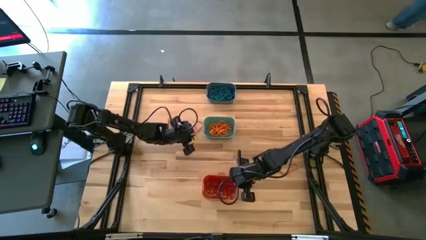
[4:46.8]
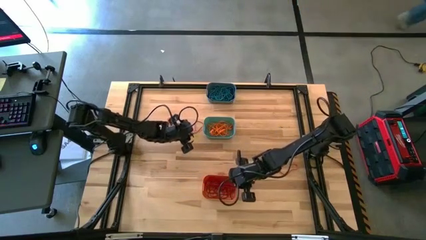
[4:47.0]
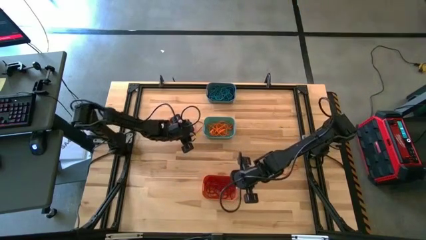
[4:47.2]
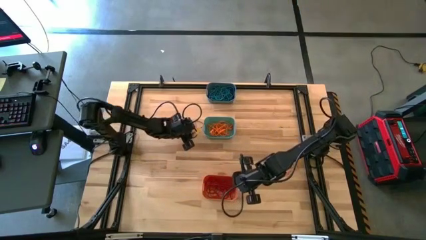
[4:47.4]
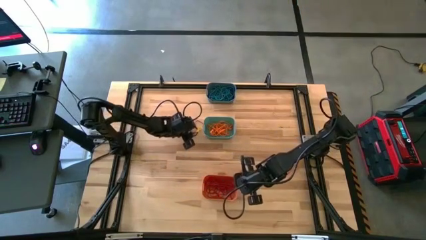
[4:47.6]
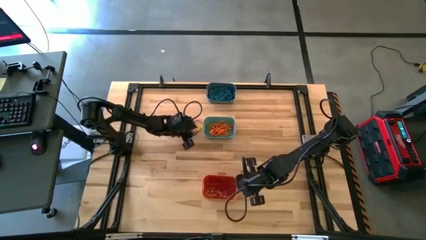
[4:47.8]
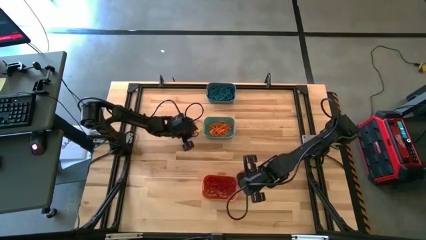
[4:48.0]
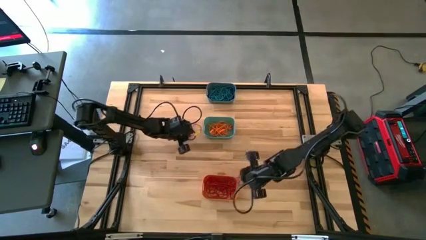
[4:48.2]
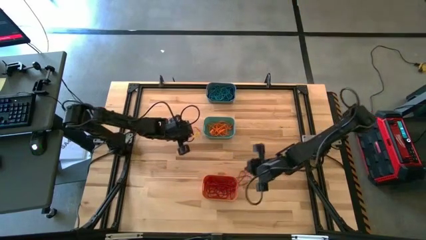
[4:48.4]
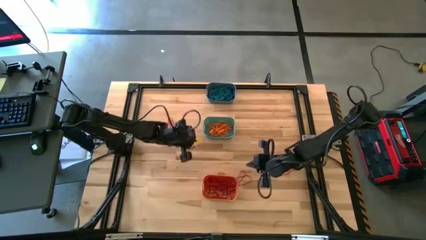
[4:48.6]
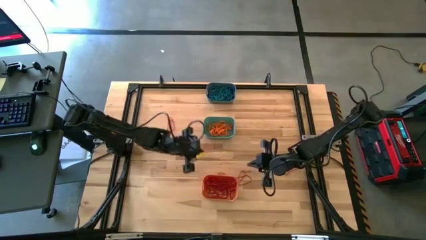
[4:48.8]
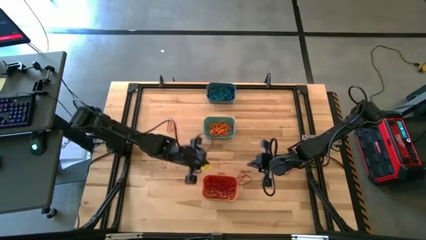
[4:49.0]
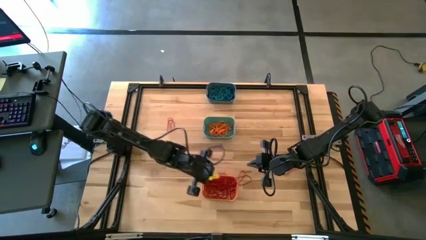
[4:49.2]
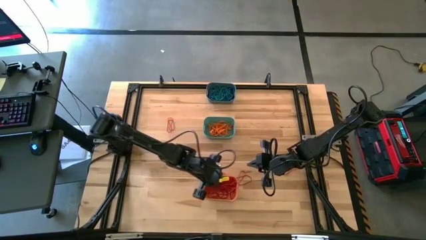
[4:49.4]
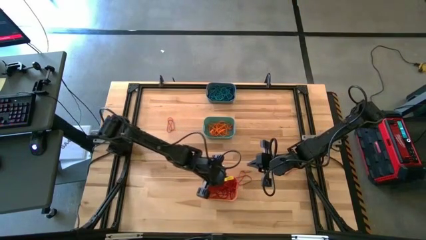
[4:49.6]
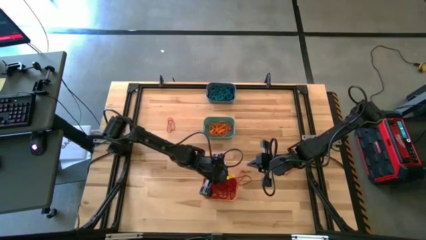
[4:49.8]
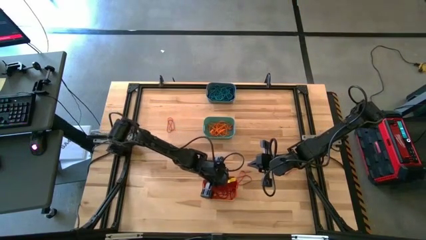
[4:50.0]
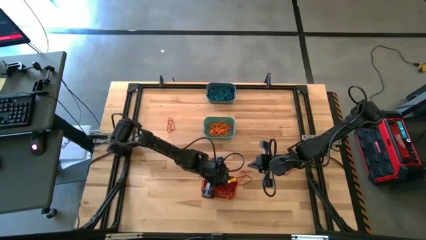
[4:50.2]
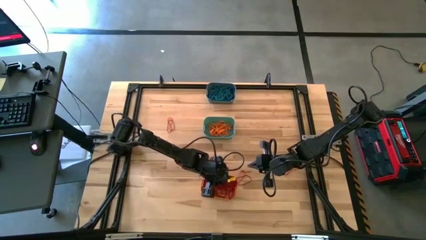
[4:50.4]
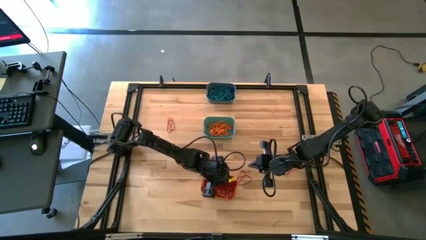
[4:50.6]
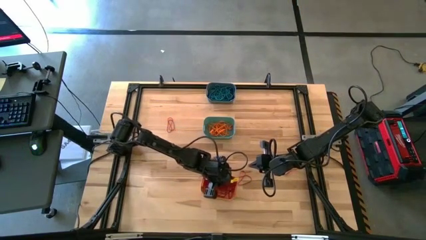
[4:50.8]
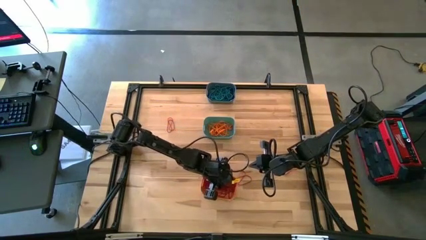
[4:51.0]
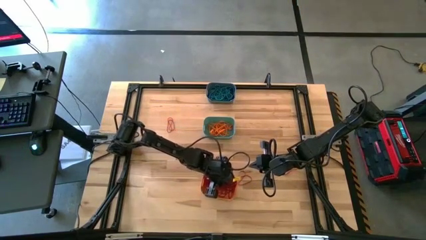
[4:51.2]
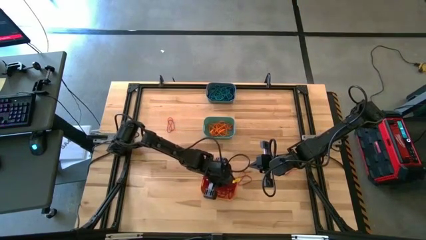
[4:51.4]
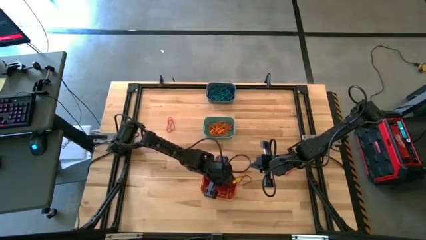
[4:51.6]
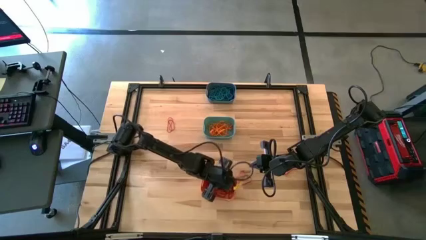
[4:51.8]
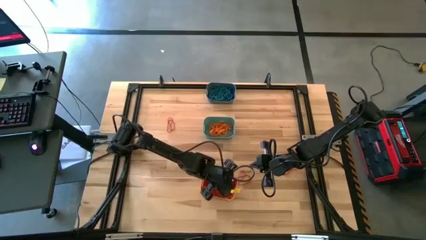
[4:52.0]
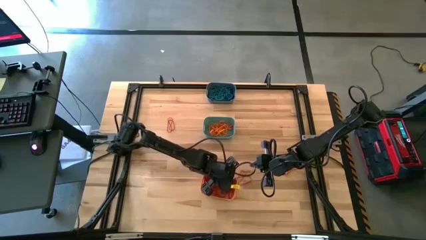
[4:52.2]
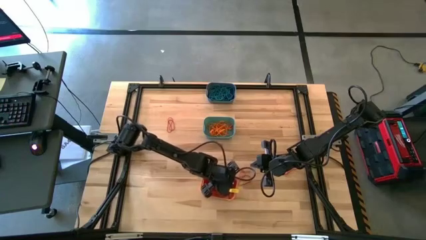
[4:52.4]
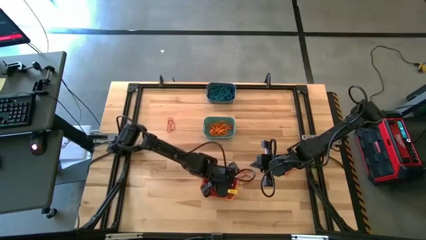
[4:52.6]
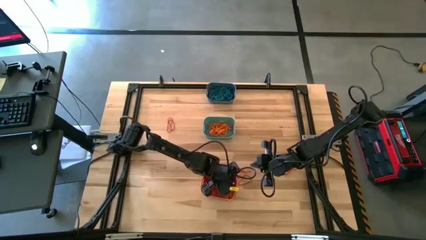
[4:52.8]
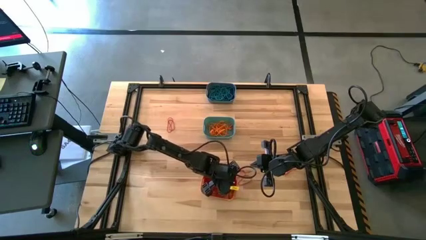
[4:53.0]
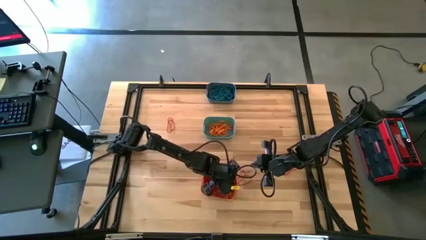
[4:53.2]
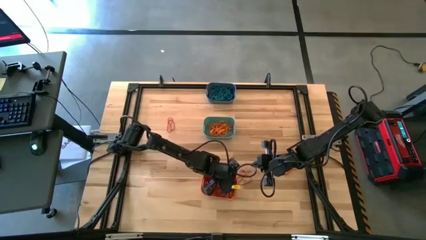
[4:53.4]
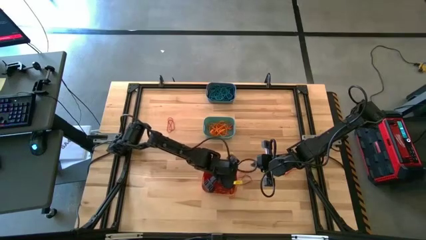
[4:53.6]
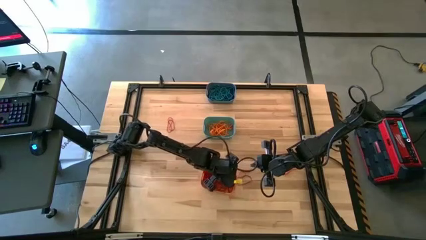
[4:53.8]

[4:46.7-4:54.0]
Task: Sort rubber bands into baskets
Put the red rubber band into the orange bin

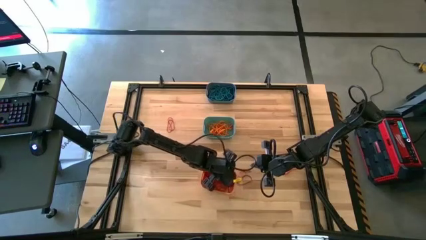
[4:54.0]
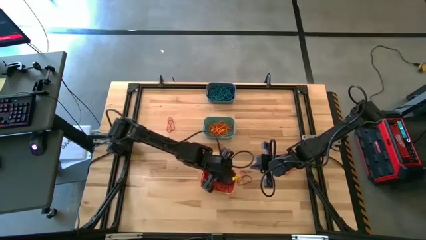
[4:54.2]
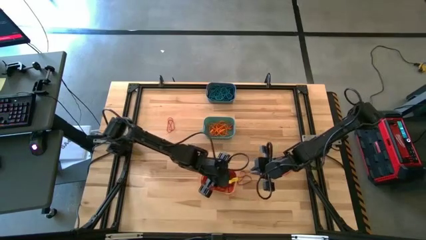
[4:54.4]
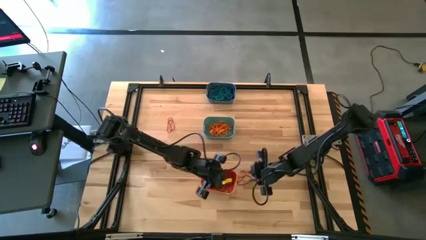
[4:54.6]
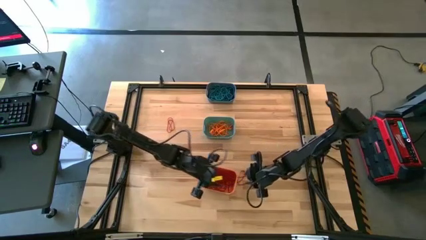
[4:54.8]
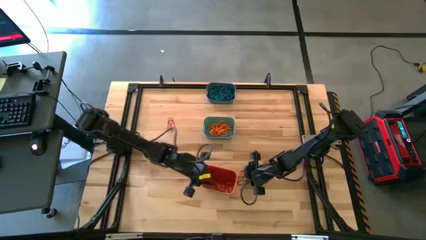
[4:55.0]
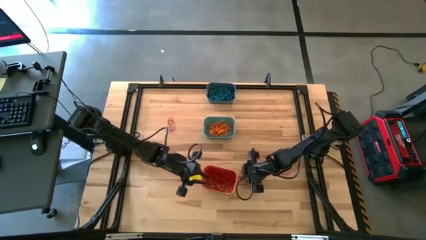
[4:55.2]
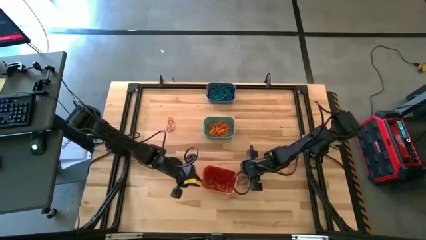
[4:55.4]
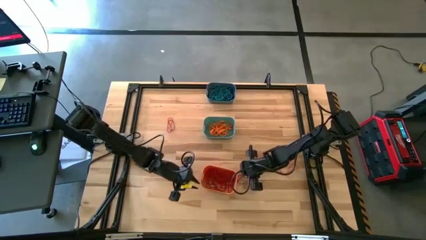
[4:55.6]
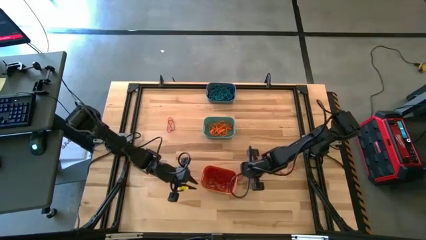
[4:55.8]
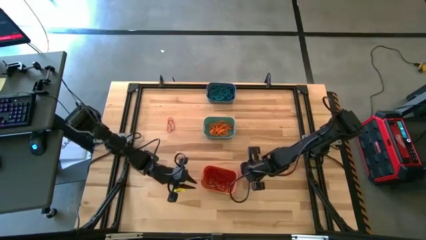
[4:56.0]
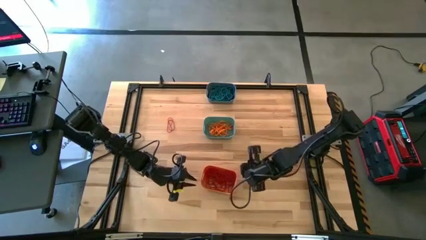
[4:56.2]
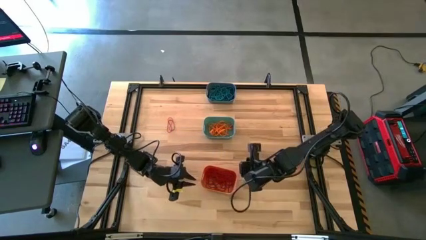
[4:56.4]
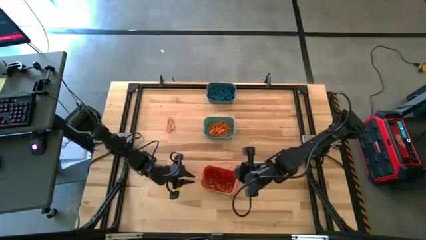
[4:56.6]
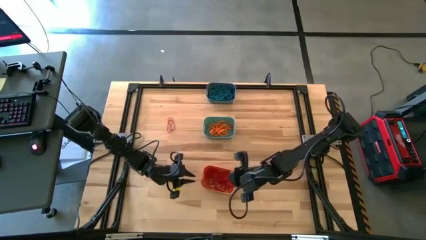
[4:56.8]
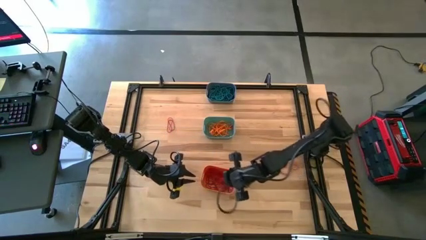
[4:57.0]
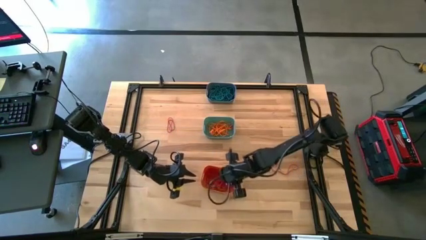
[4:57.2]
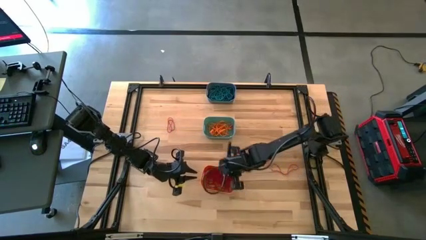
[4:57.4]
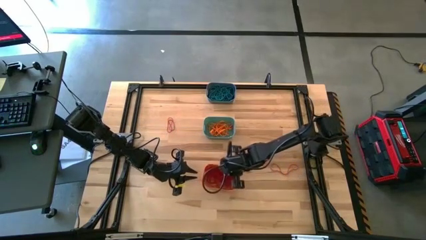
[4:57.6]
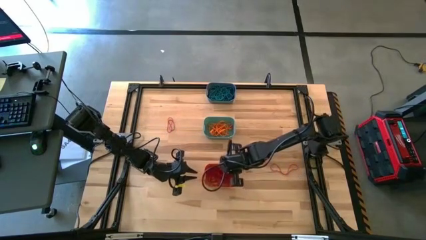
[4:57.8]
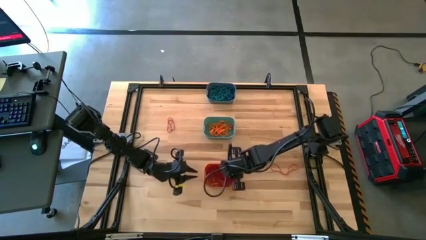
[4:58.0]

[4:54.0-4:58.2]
Put the red rubber band into the orange bin

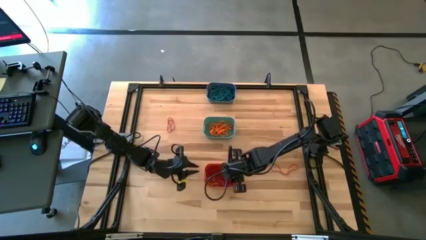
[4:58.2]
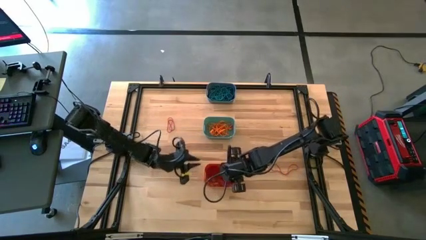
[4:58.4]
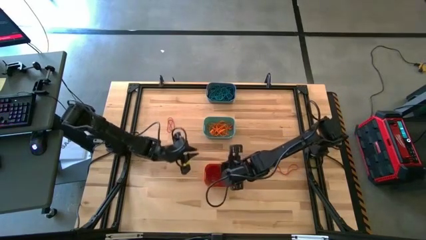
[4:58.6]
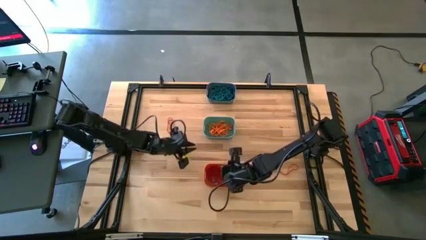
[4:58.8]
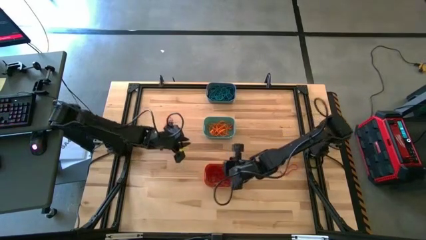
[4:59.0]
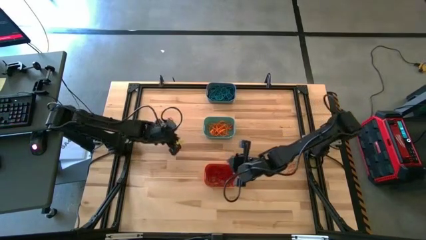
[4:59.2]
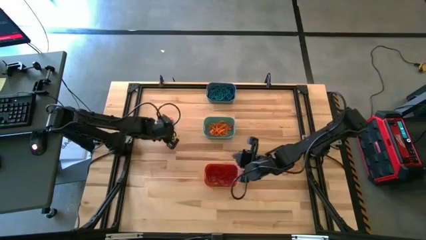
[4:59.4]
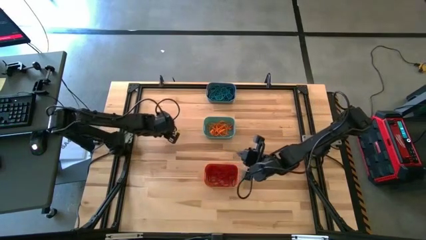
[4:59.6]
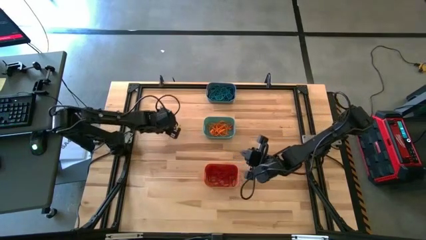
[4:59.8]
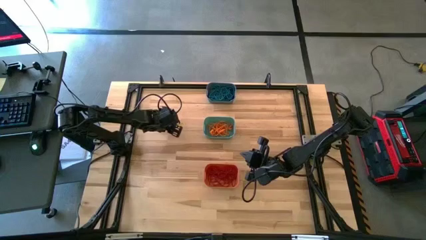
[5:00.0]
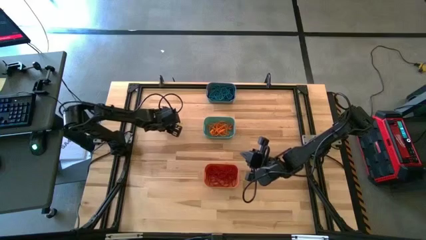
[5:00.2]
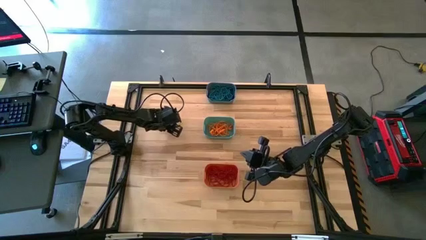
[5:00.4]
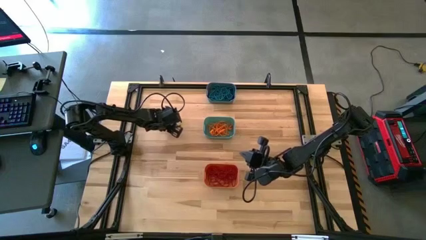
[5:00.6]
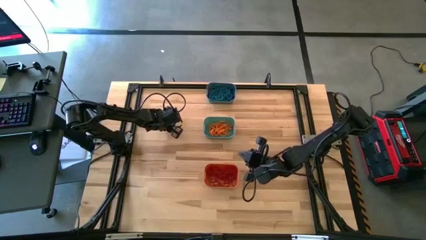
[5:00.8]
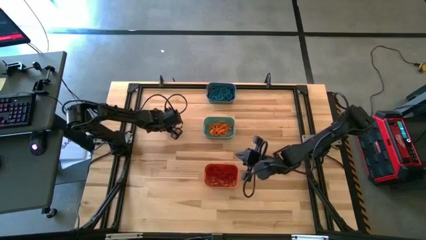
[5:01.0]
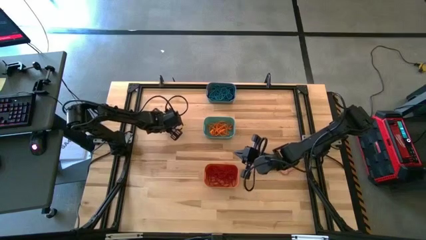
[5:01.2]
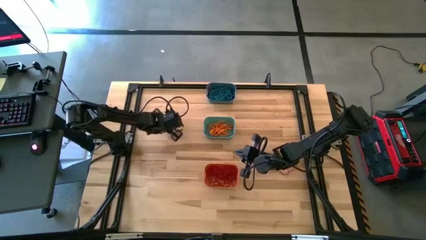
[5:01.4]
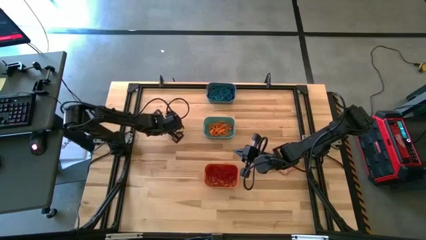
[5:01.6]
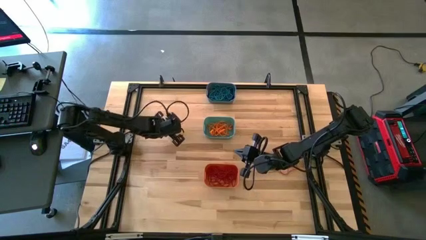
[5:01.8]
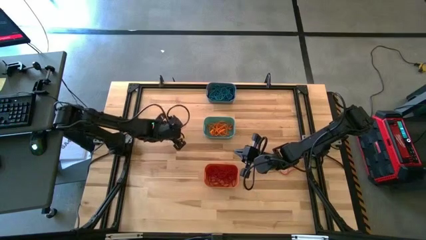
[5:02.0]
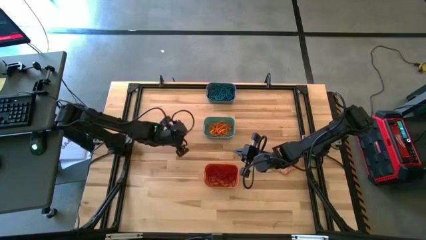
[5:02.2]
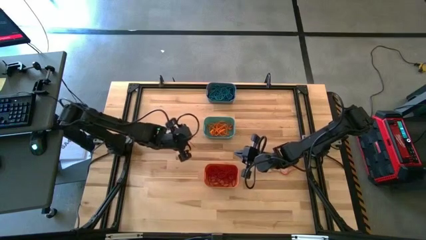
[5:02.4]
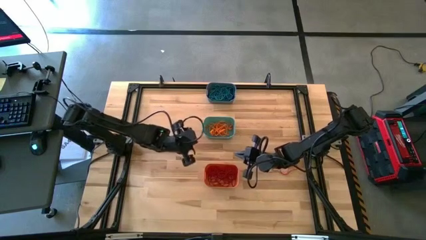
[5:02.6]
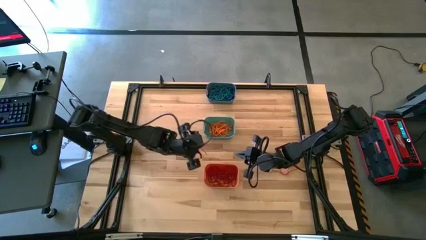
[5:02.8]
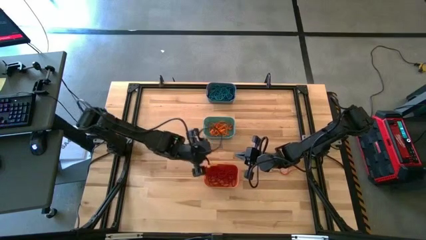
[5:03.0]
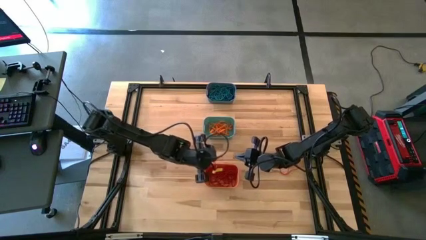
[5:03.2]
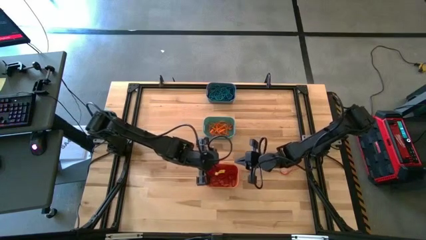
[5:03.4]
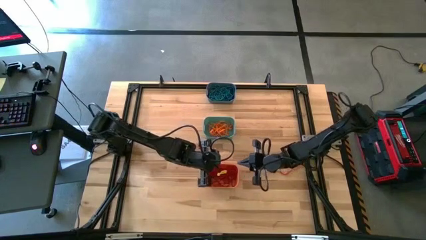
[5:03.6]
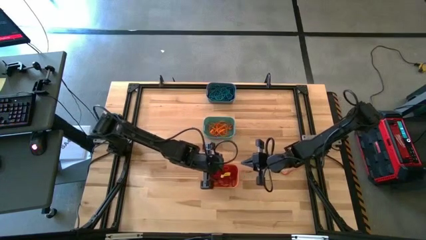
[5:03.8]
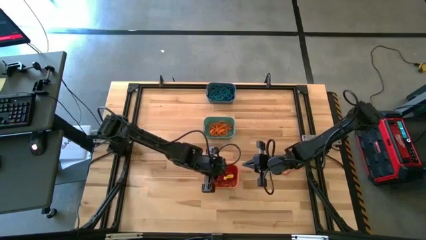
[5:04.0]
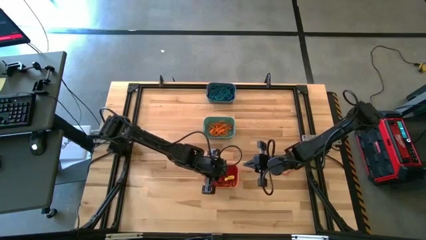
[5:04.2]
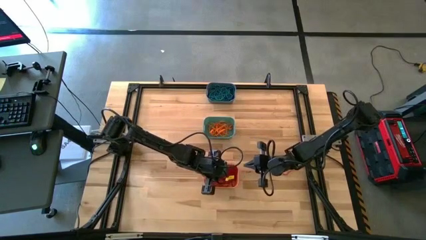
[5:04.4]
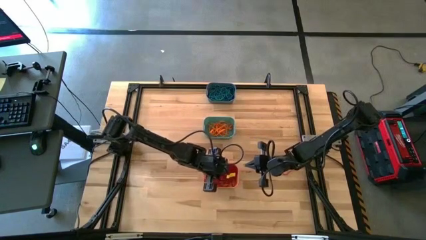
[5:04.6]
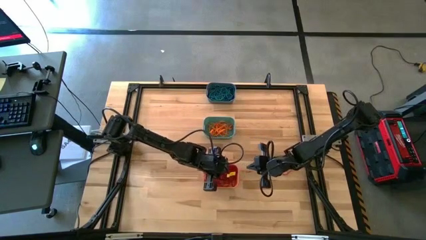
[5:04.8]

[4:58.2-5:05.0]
Put the red rubber band into the orange bin
